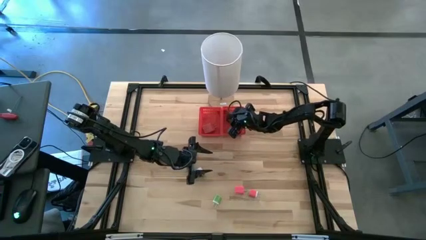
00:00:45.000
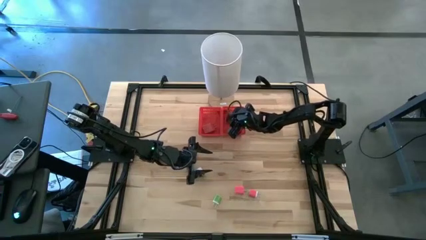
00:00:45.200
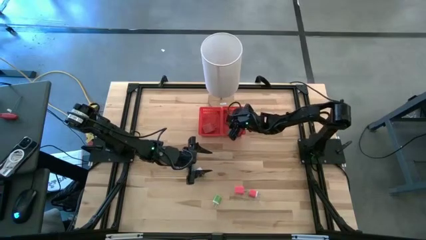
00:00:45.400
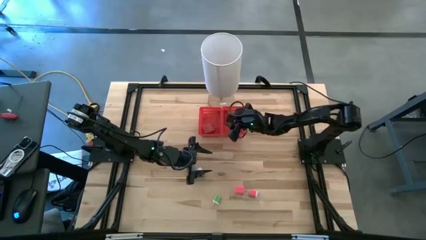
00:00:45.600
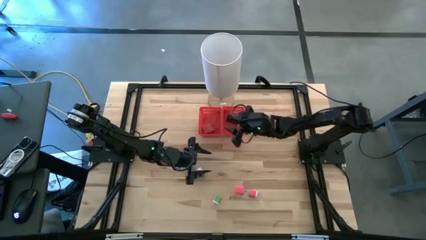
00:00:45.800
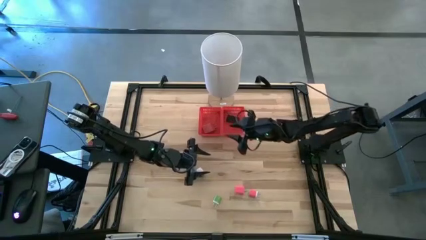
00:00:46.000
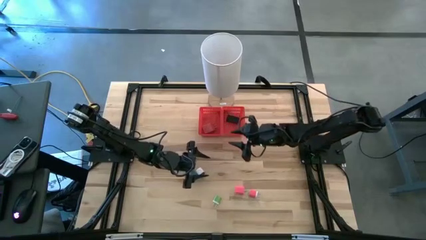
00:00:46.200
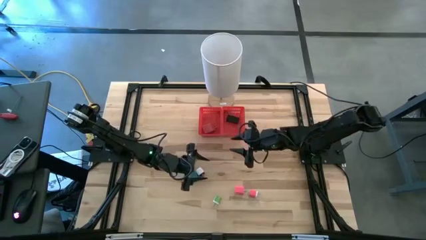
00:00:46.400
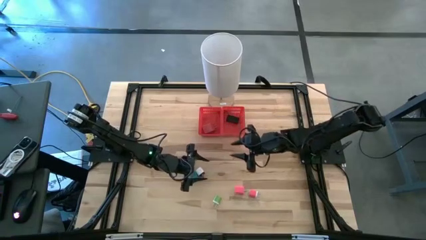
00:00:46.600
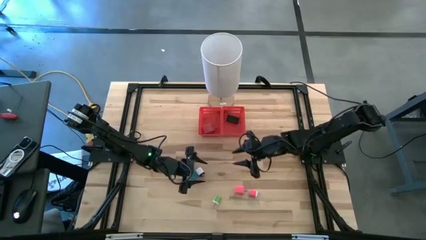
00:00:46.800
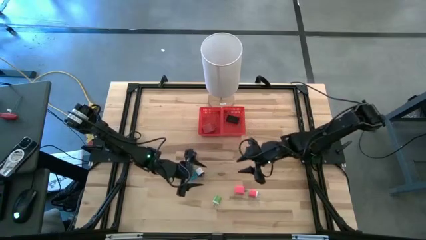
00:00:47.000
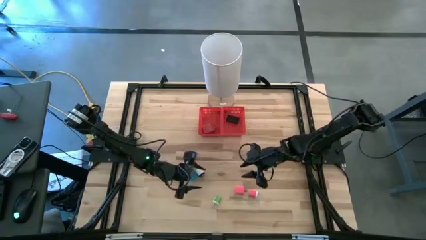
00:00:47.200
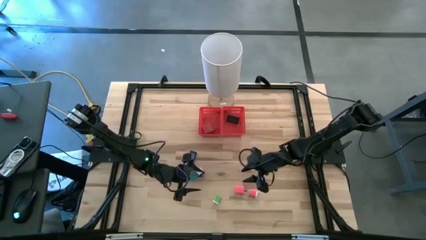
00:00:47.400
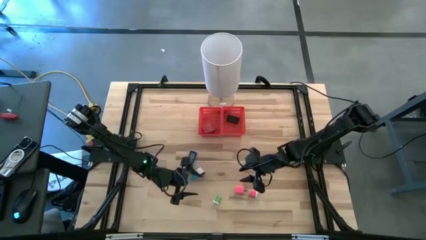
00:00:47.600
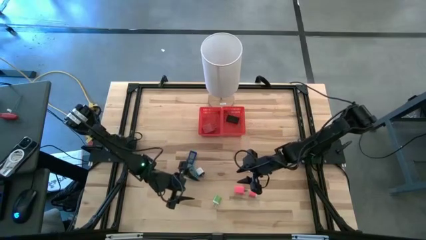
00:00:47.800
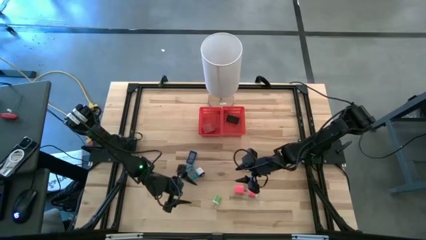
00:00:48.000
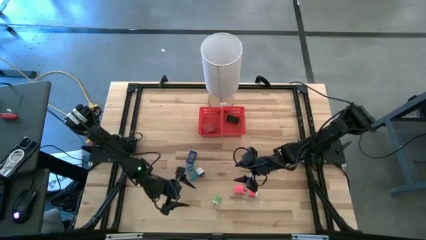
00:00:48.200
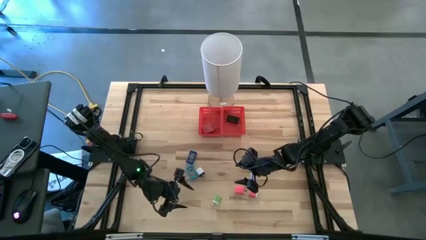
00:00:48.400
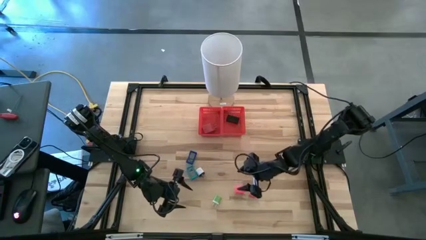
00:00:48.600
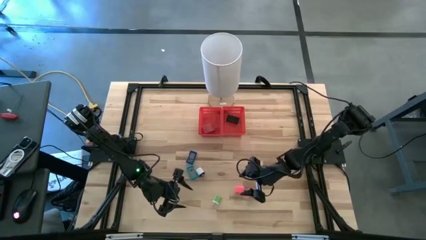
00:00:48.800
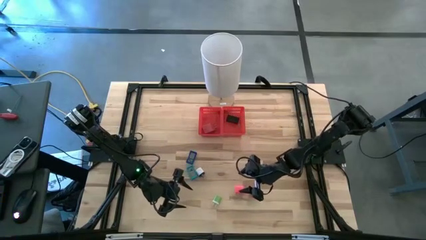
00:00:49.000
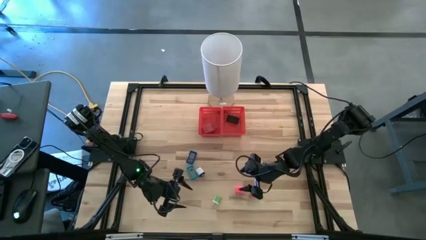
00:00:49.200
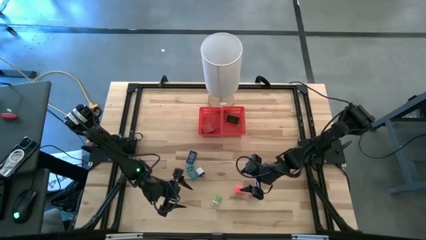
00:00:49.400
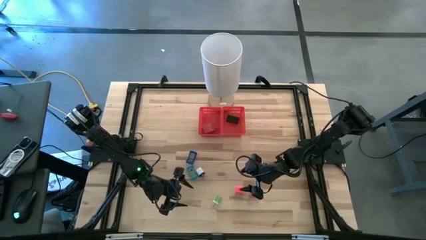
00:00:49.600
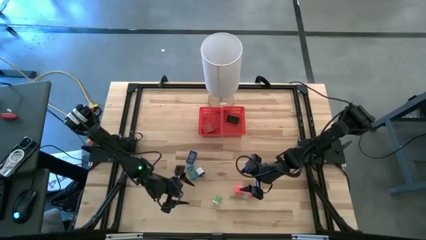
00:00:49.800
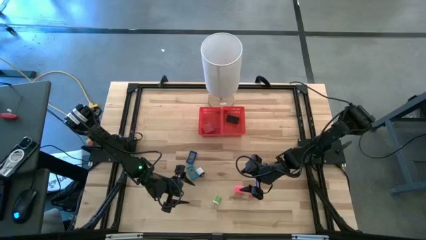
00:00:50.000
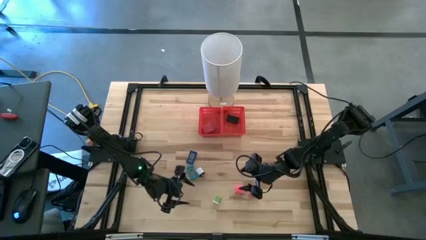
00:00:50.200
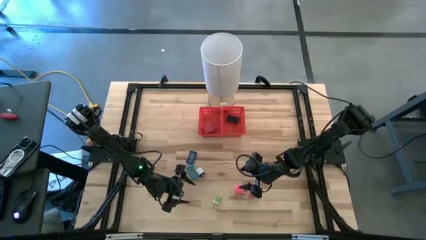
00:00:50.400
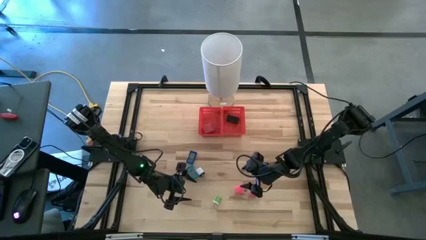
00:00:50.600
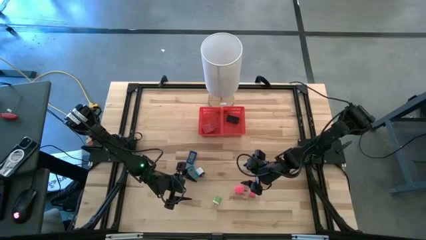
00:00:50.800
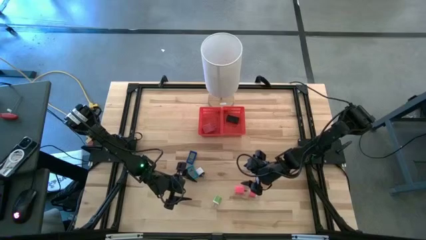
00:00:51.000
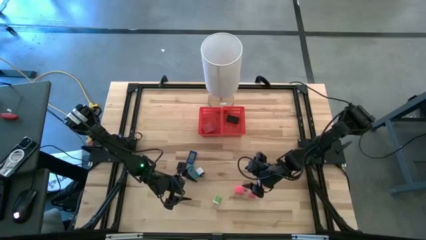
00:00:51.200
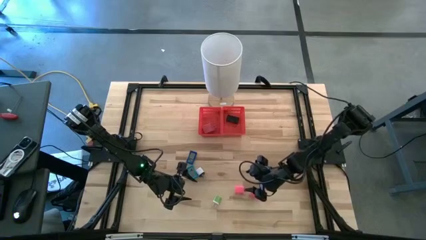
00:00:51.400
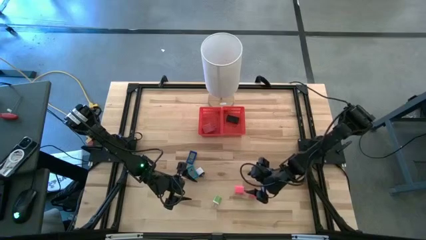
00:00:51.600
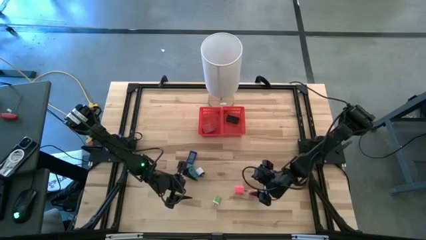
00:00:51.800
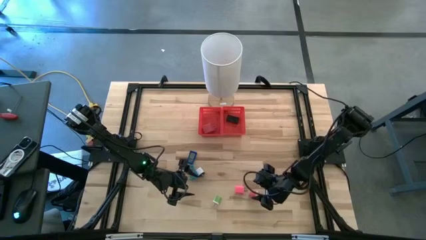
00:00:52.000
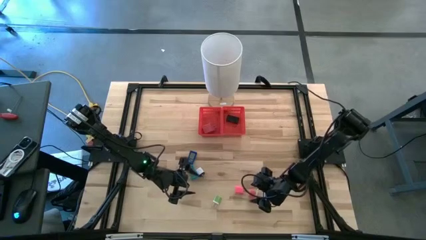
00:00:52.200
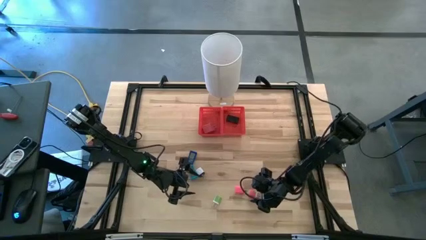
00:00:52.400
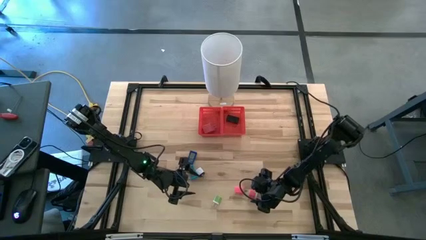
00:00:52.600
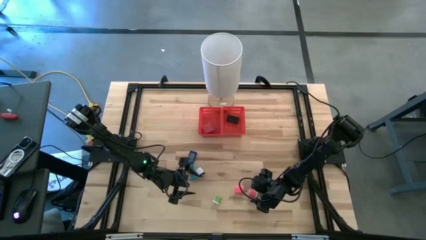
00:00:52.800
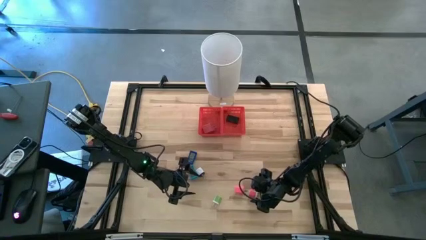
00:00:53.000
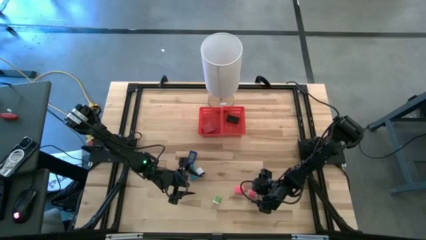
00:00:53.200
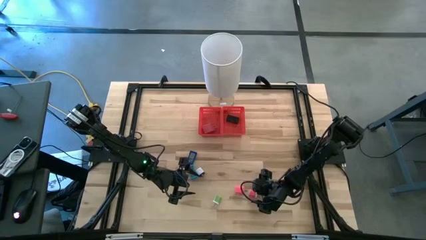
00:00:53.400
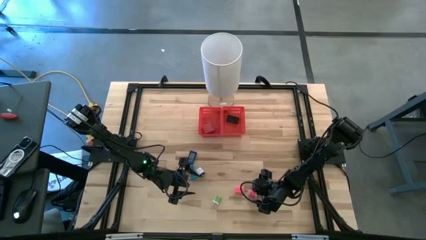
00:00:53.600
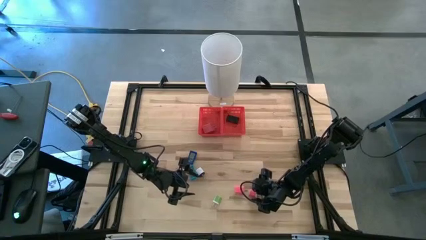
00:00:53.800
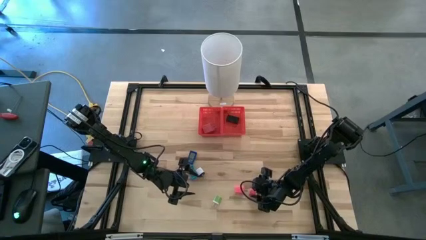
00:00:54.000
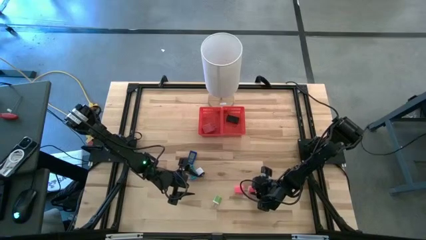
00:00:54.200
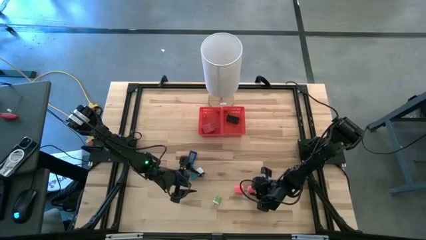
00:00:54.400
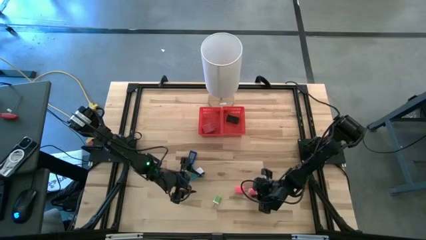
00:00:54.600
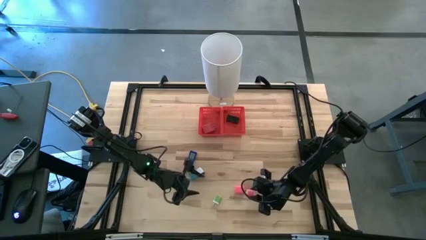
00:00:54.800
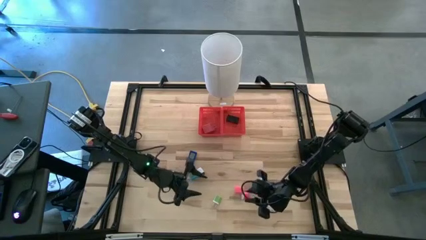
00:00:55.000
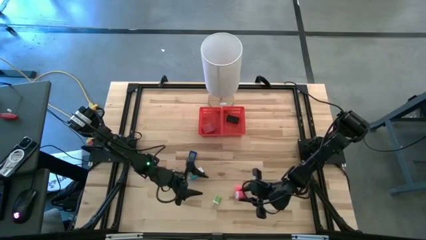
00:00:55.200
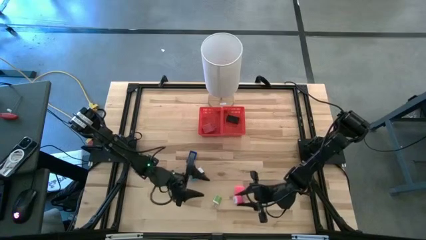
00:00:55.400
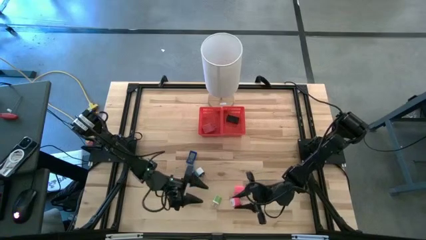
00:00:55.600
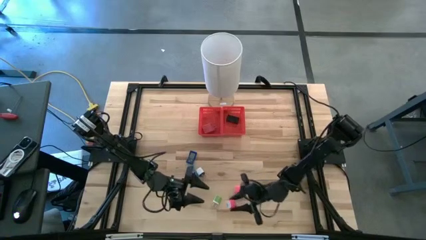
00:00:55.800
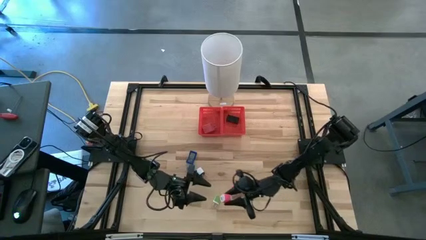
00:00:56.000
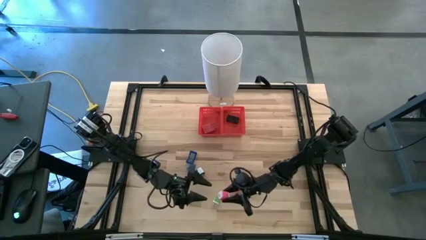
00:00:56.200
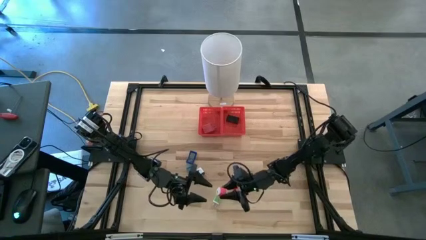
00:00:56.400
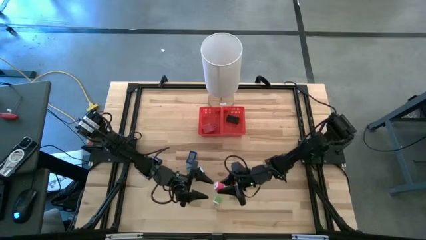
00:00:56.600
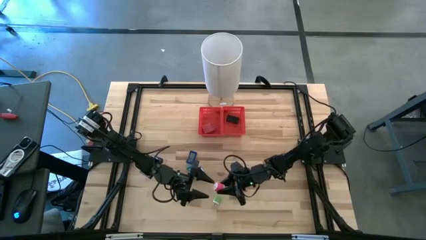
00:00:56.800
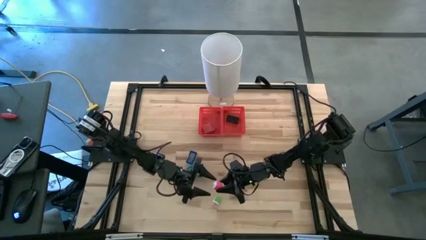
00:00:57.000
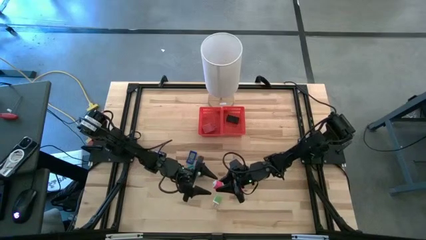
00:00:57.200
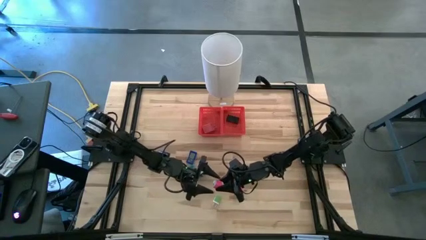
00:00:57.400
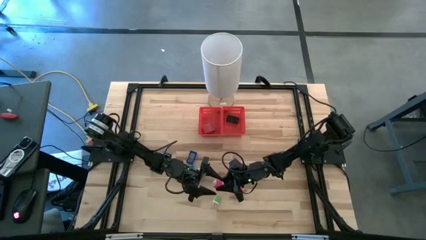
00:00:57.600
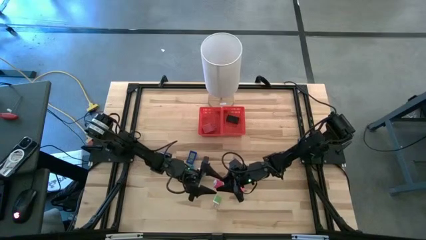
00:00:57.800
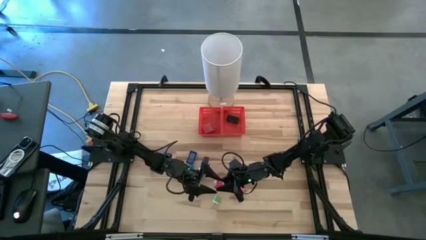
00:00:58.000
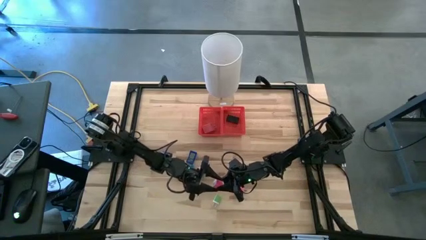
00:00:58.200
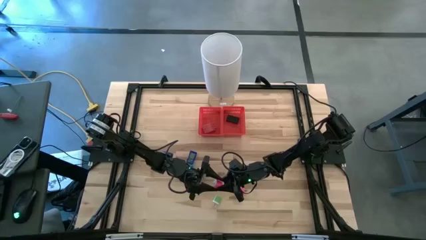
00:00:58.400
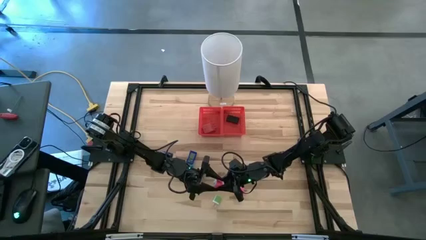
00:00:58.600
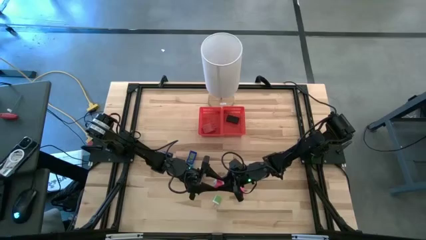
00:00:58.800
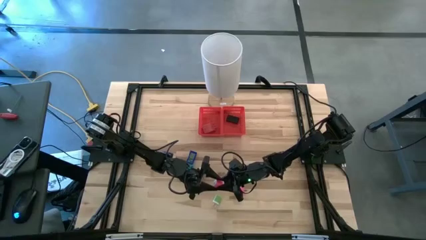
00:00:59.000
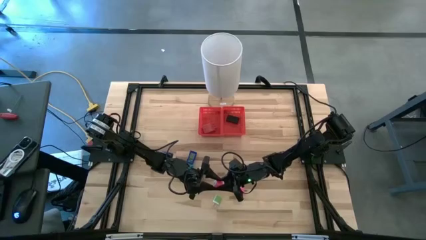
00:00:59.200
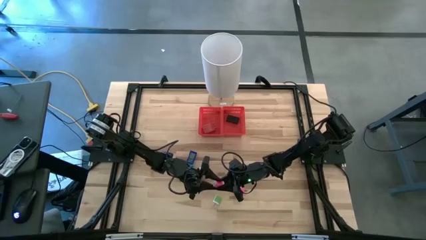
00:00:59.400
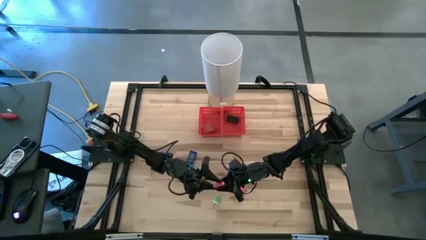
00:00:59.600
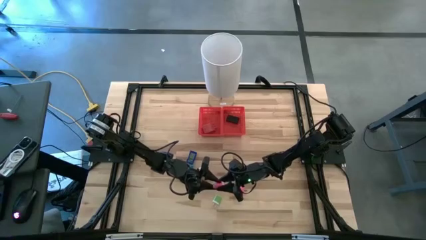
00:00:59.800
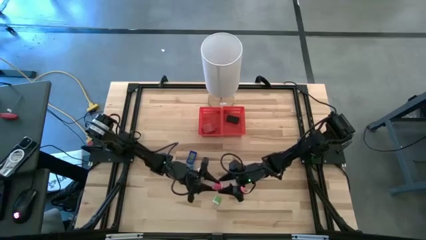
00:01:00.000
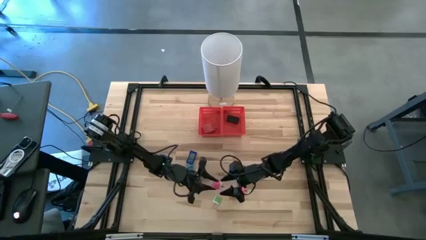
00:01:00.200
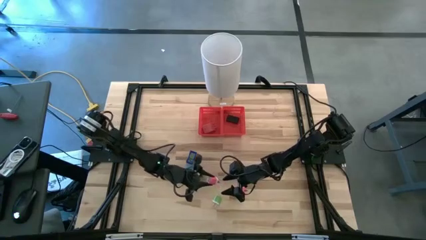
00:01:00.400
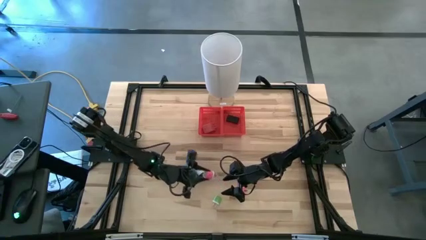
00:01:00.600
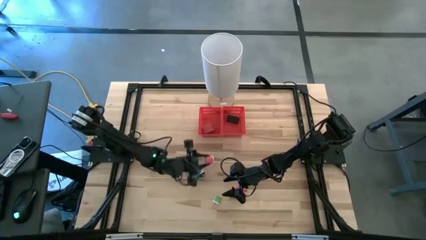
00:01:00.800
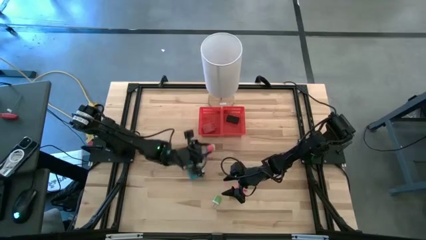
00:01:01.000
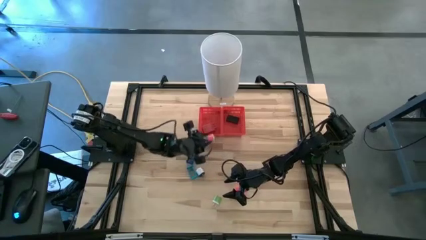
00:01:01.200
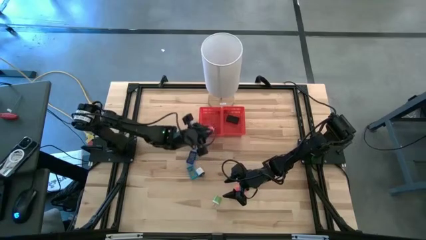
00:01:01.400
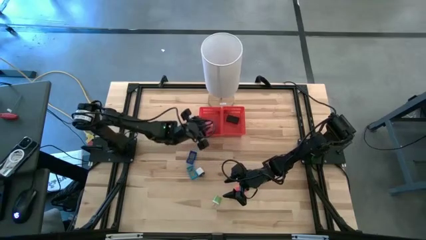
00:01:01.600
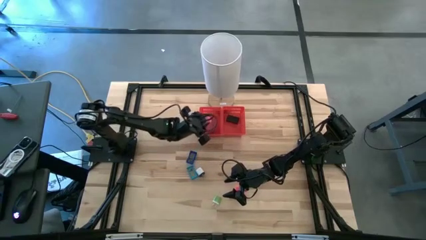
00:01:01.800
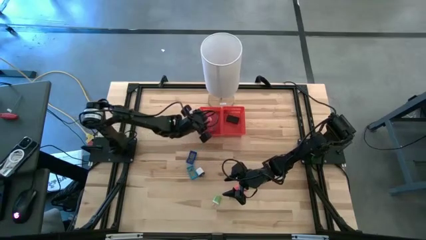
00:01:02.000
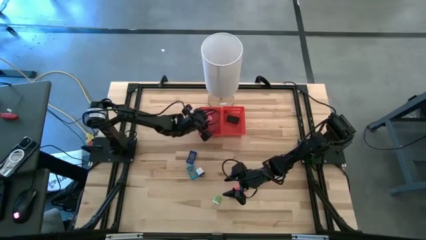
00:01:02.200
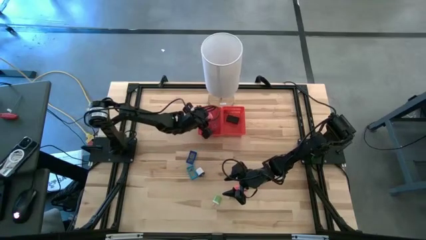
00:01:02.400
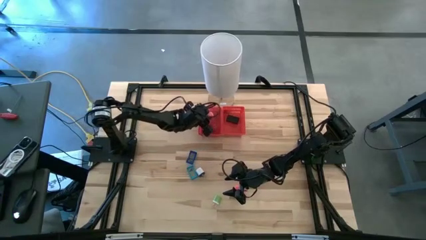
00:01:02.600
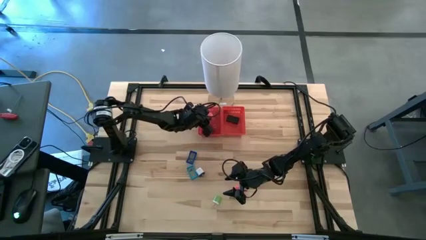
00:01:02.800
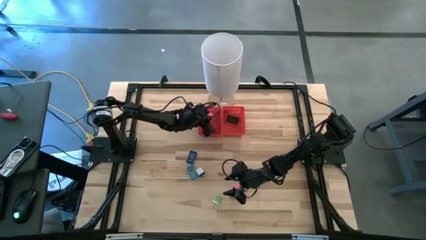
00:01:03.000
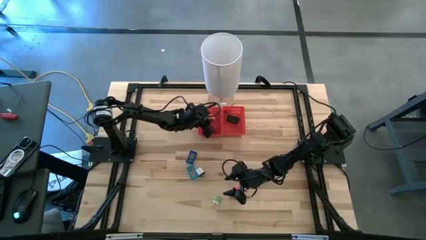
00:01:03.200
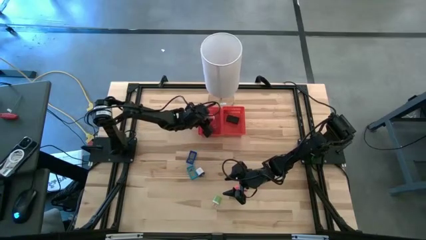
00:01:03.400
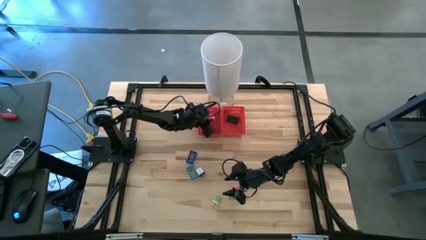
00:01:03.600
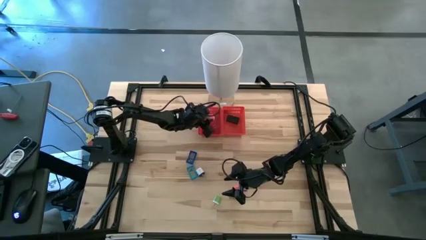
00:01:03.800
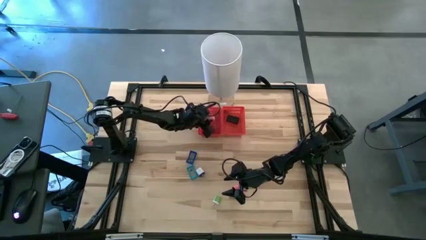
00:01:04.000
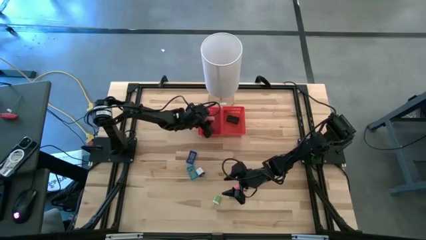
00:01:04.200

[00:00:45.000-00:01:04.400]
Task: Pick & Place Office items
Put the white pink charger adapter into the left red bin
